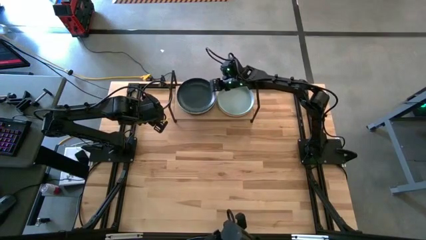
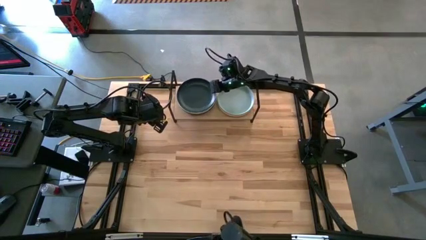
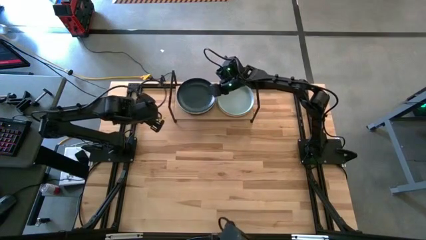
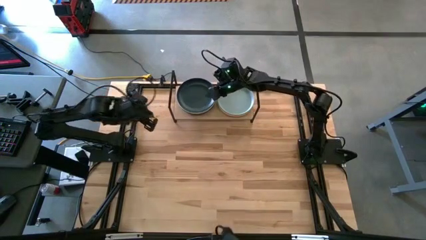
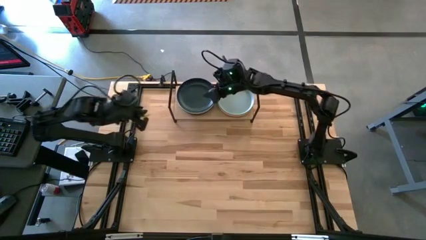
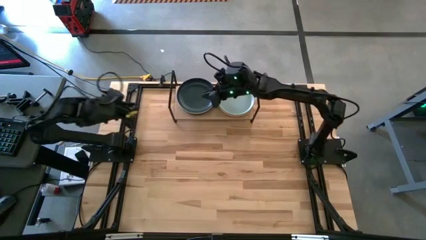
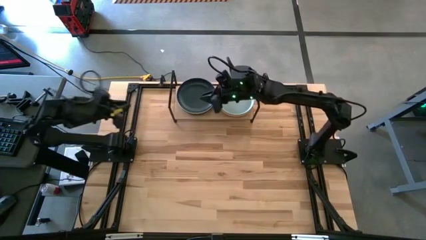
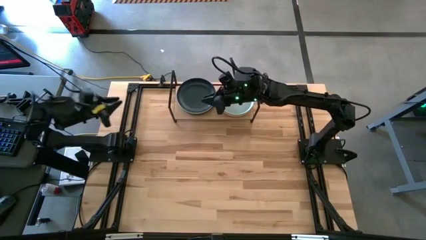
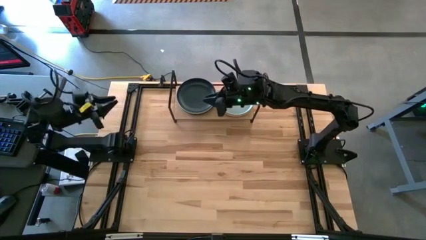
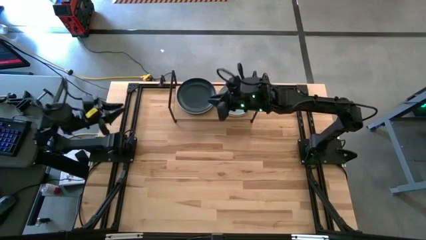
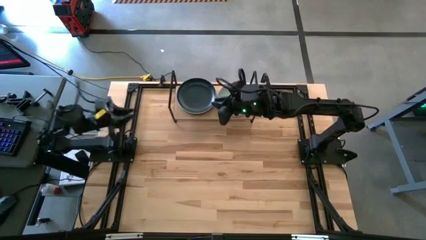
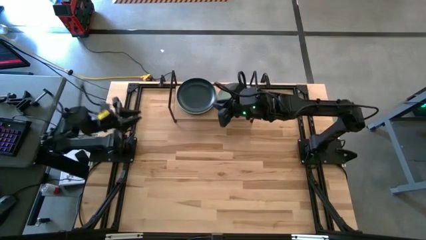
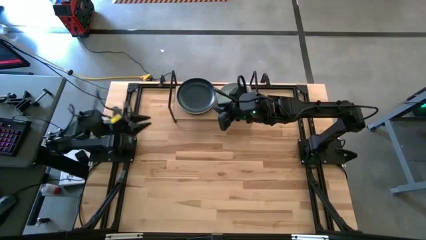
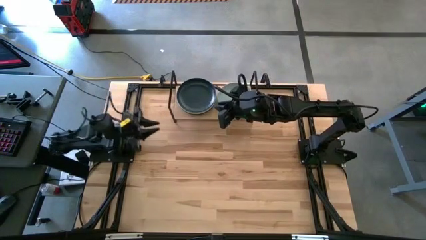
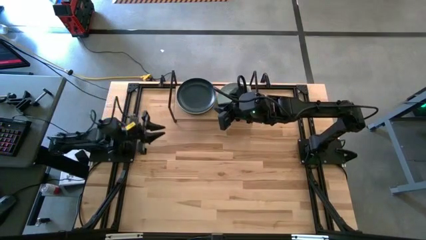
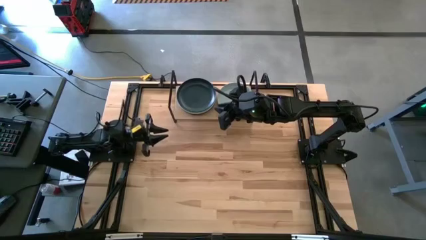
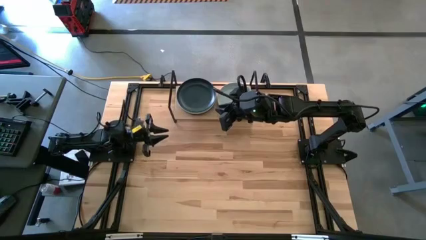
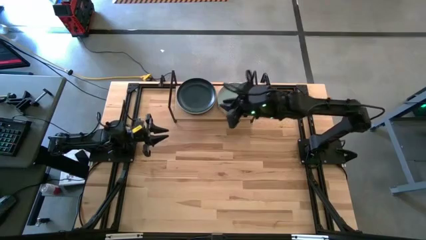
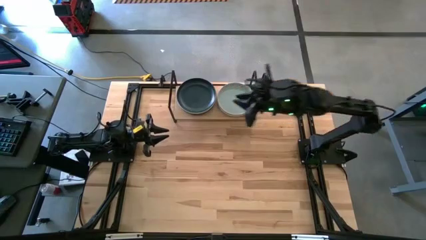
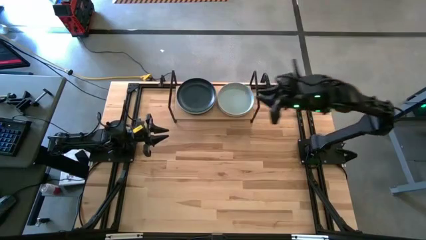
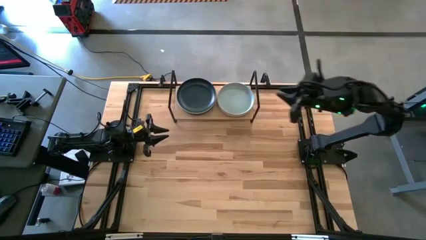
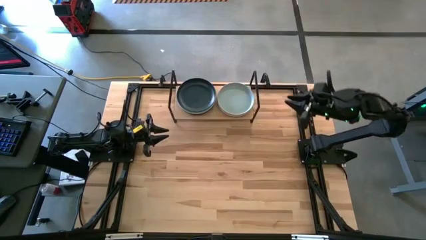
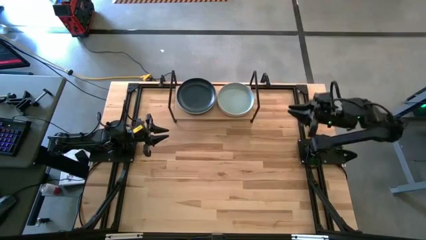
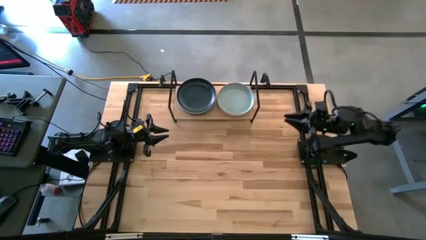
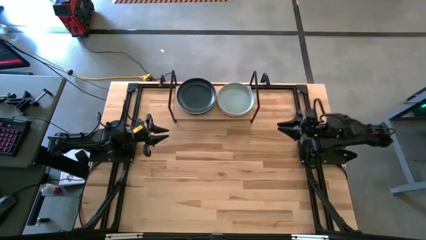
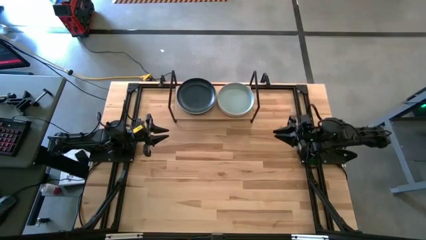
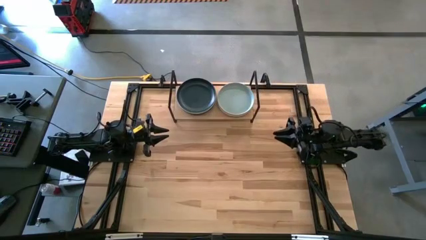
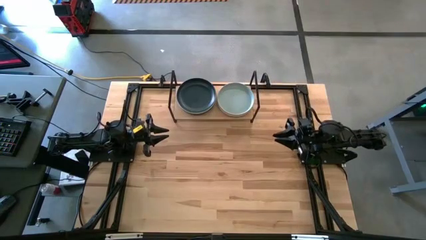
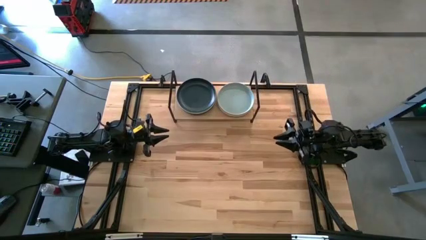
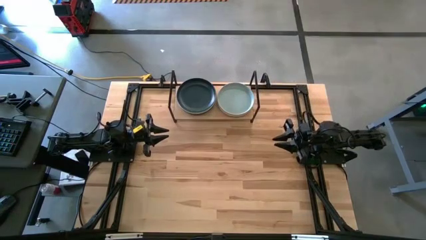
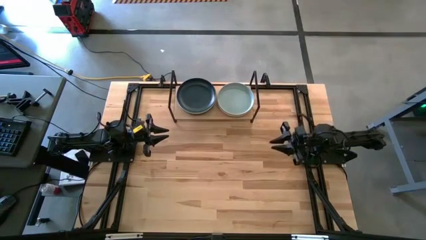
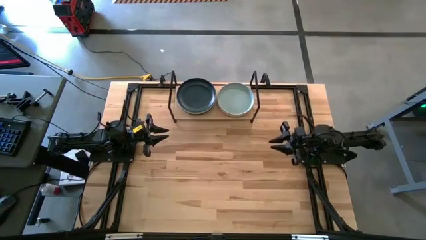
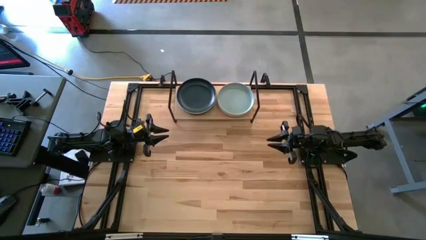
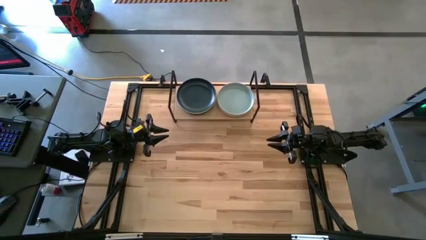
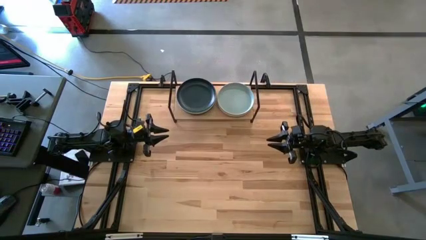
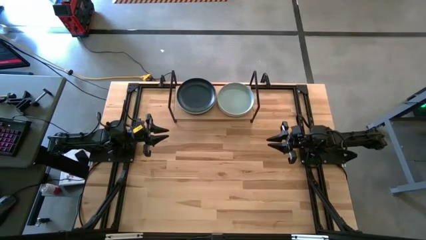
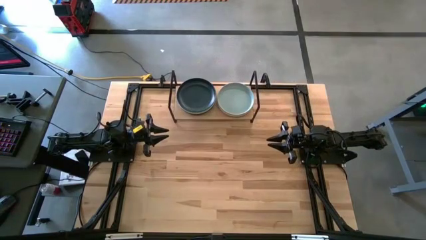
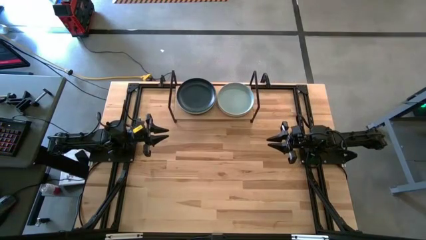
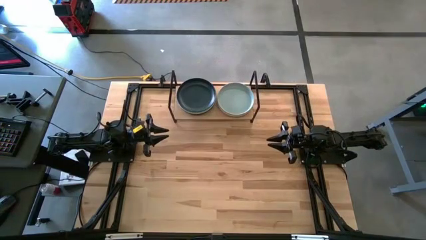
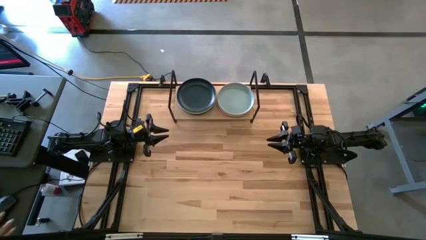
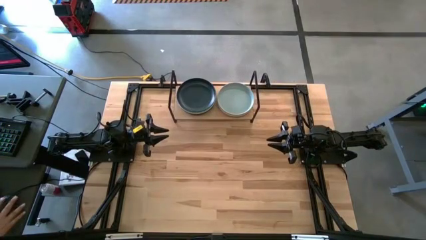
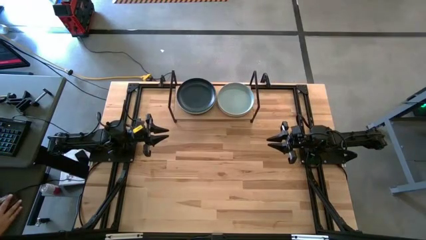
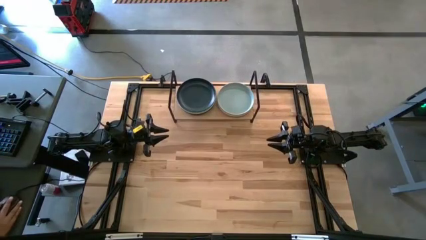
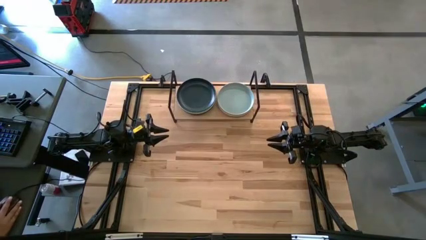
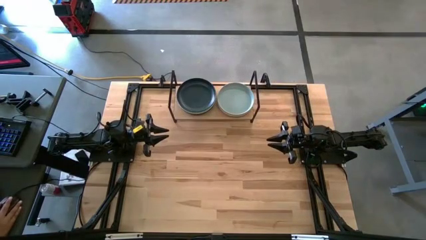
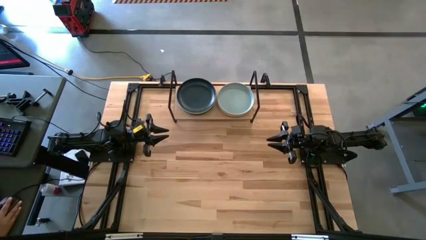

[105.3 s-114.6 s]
Task: Place and stack plates onto a shelf
Return to Home Position

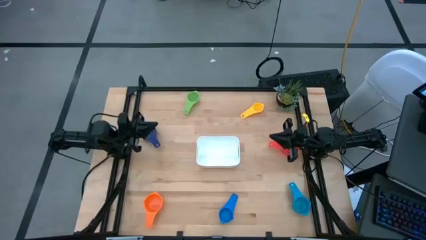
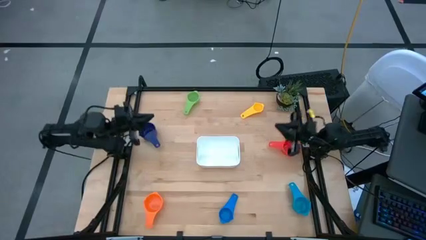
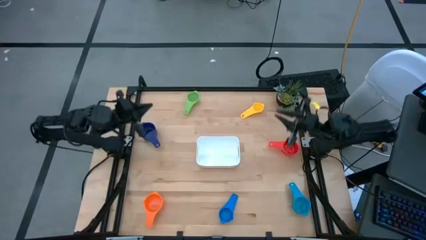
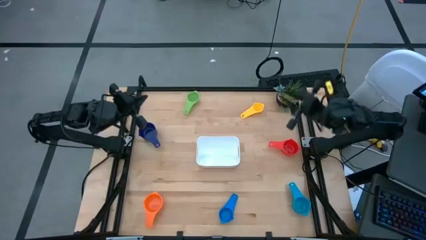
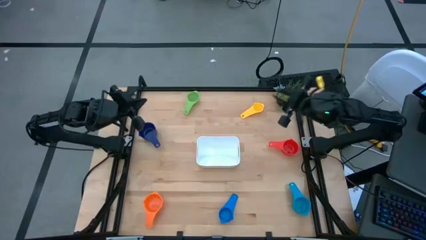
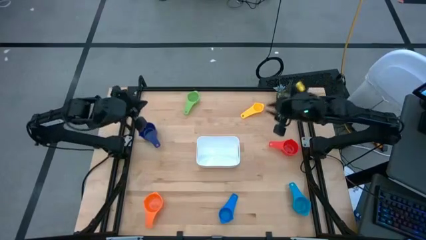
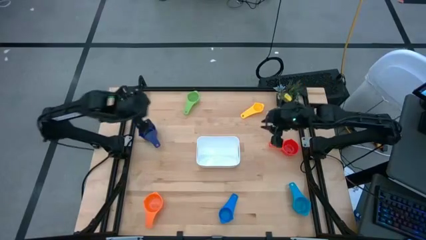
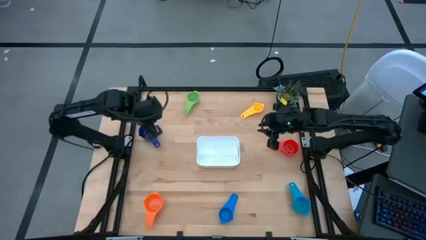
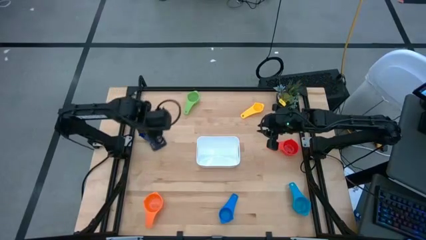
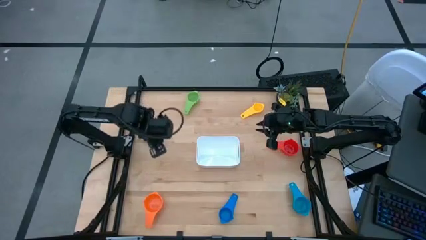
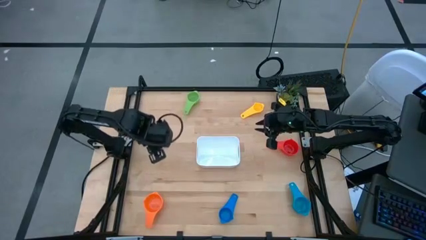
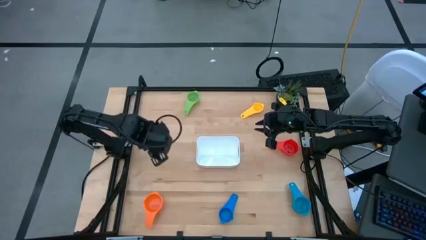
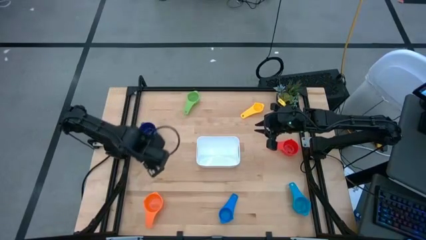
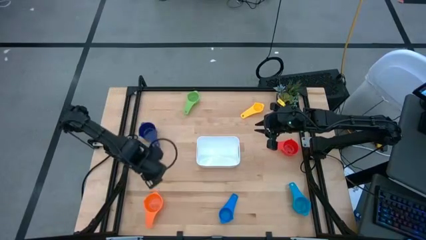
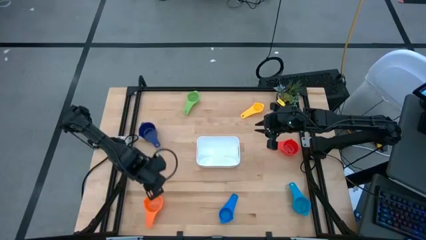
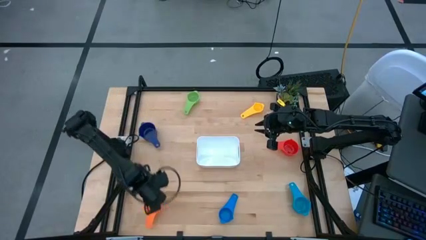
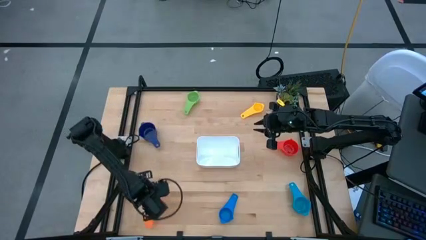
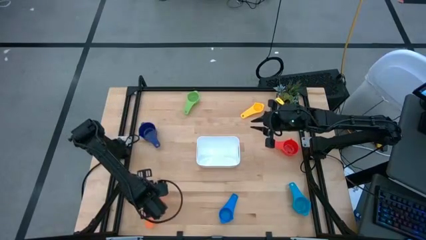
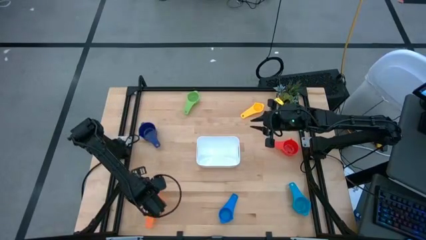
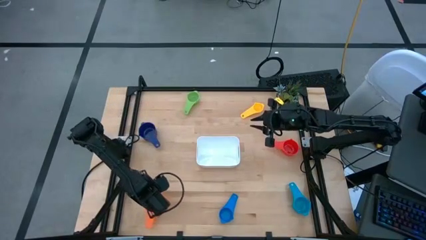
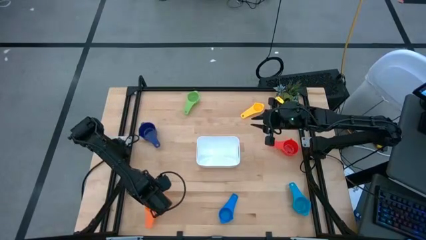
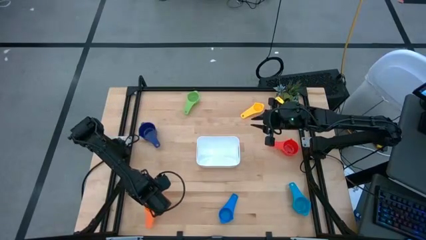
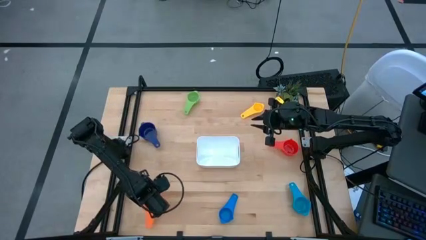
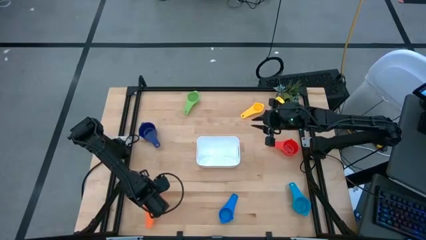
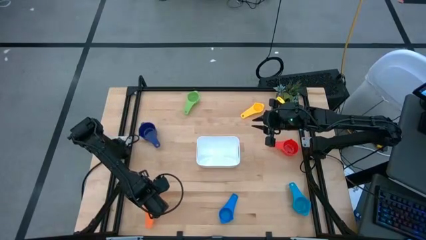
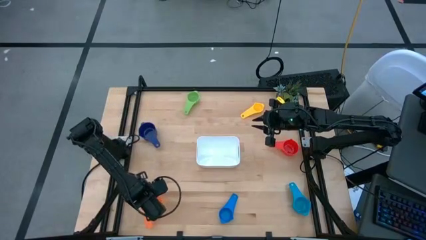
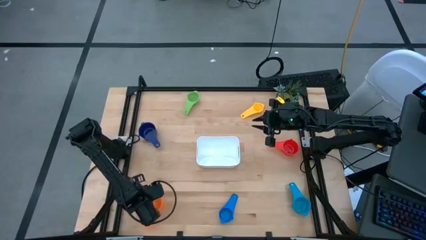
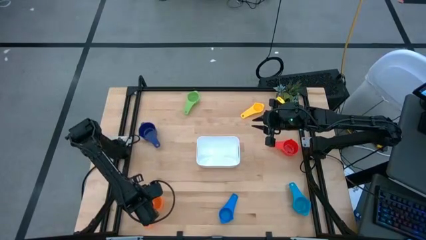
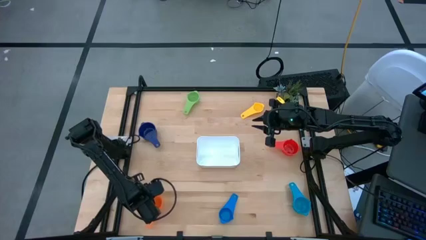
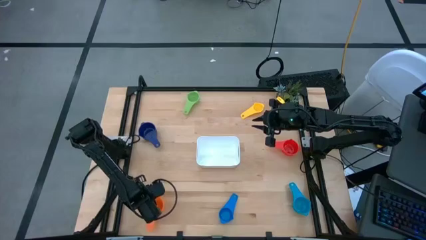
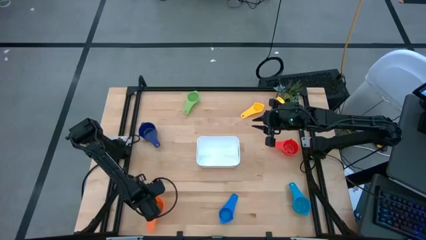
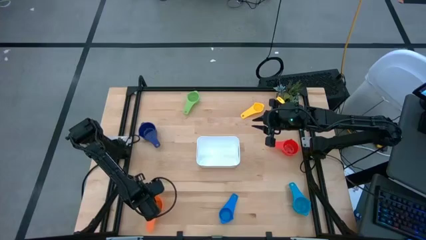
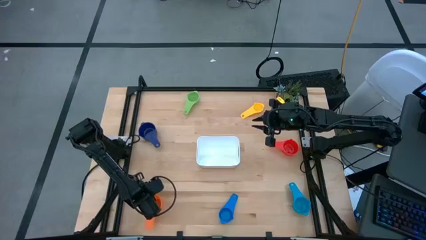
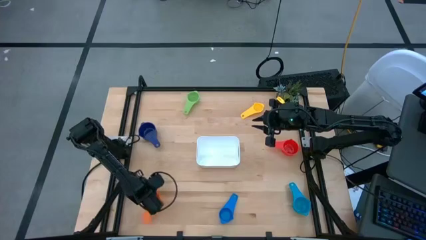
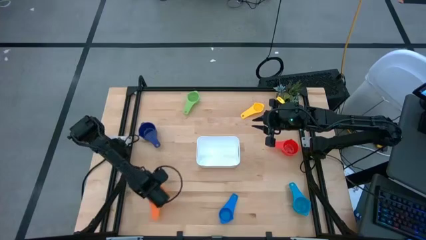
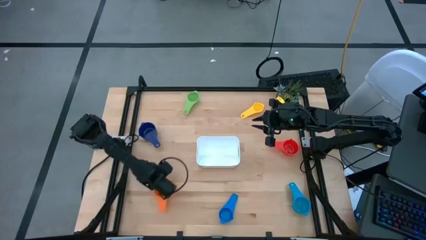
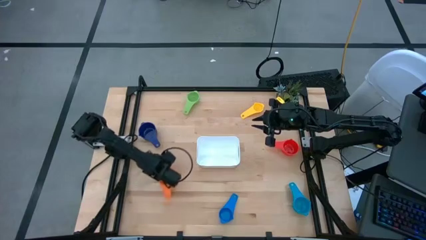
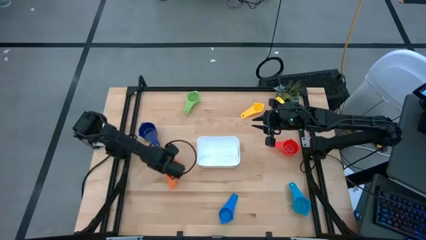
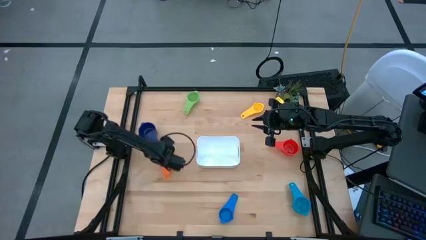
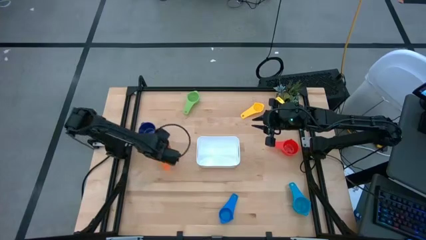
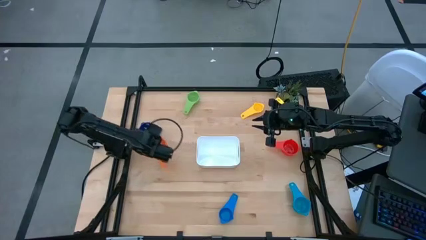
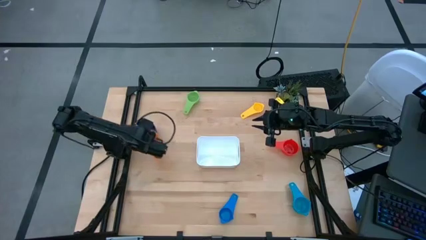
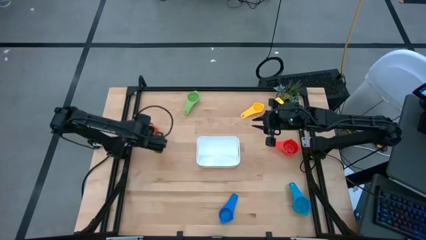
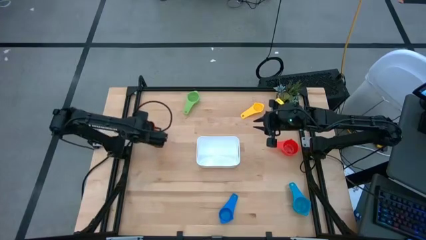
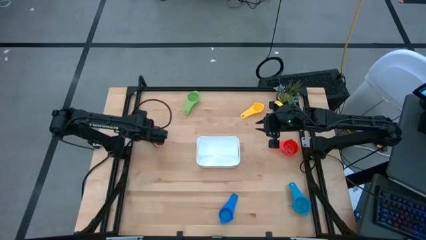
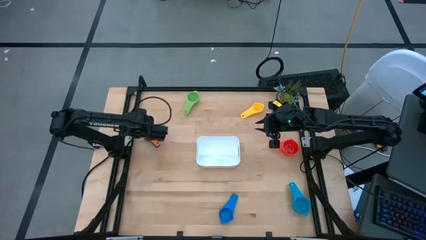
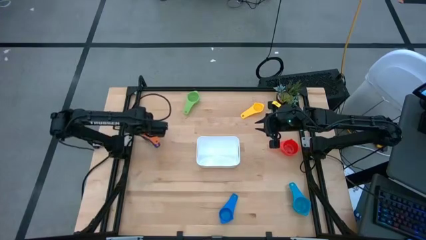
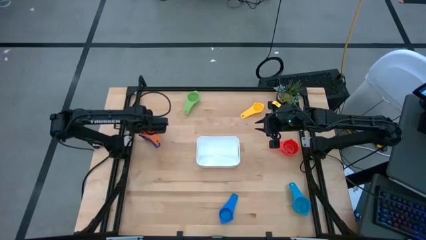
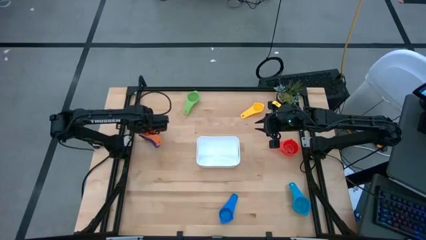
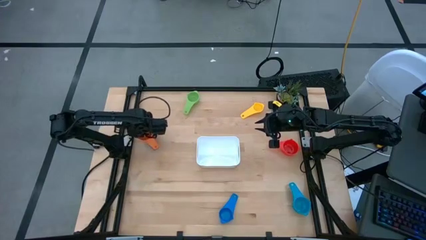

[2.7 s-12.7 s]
Task: Nest measuring cups in basket
Stack the orange measuring cup on top of the blue measuring cup
